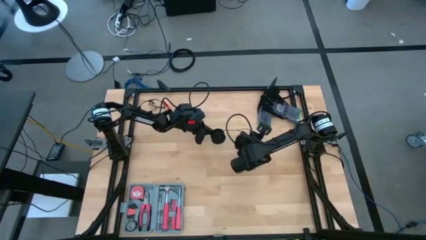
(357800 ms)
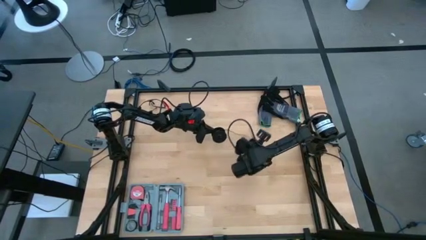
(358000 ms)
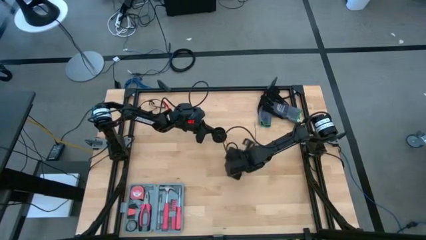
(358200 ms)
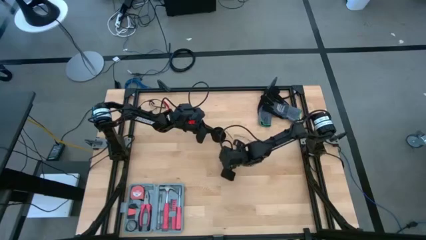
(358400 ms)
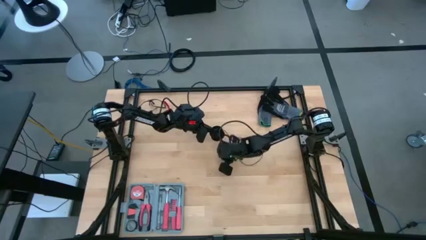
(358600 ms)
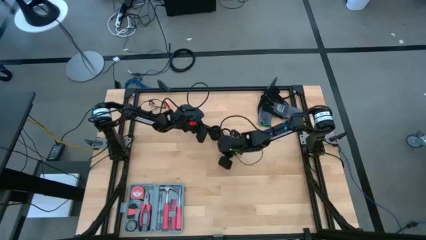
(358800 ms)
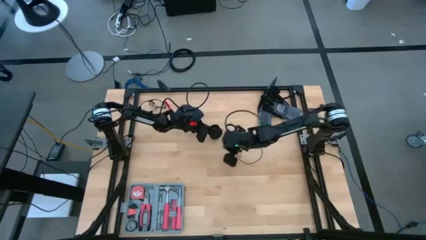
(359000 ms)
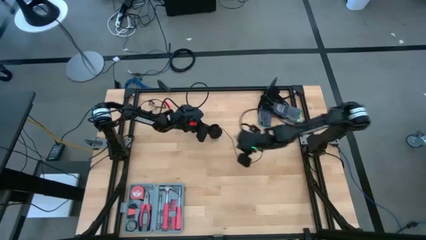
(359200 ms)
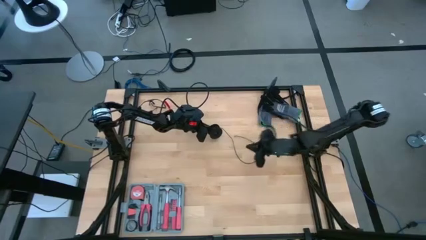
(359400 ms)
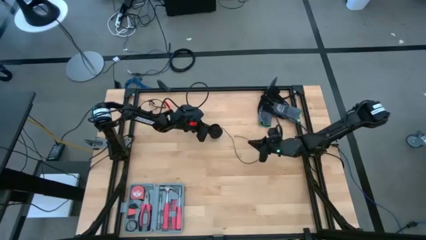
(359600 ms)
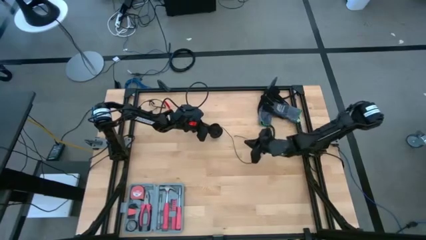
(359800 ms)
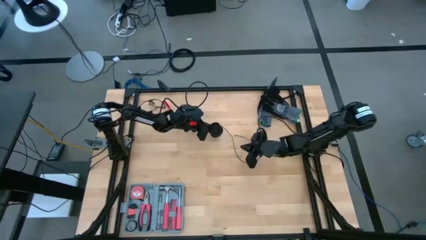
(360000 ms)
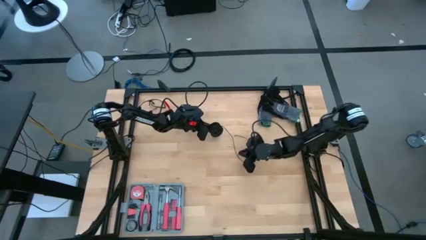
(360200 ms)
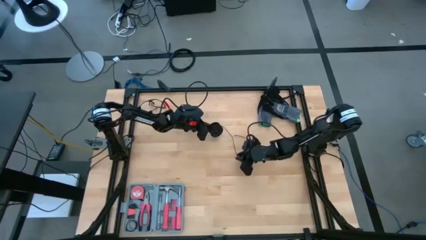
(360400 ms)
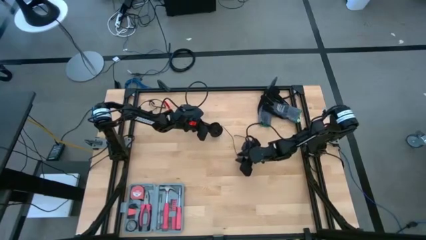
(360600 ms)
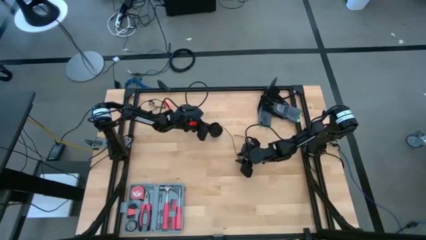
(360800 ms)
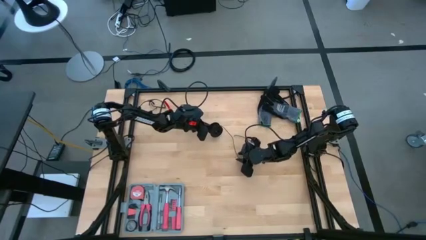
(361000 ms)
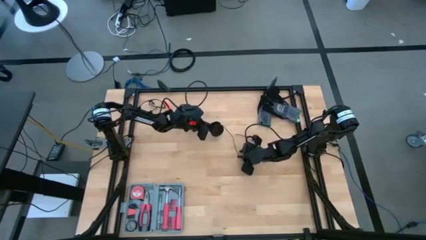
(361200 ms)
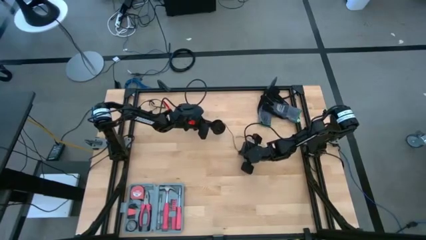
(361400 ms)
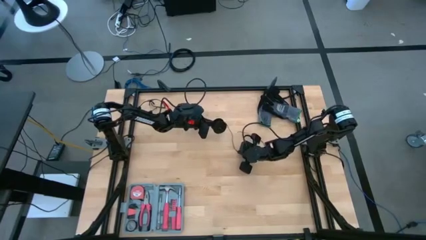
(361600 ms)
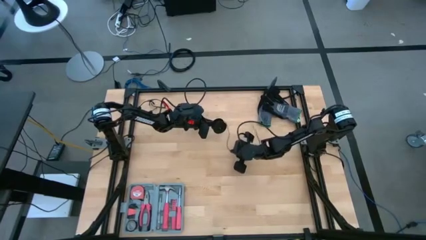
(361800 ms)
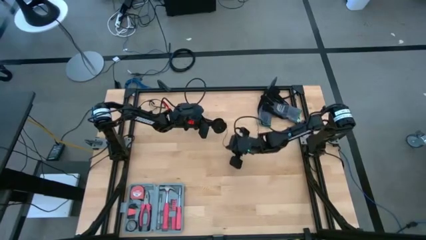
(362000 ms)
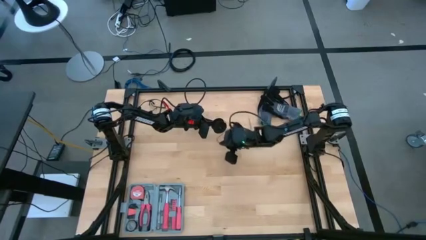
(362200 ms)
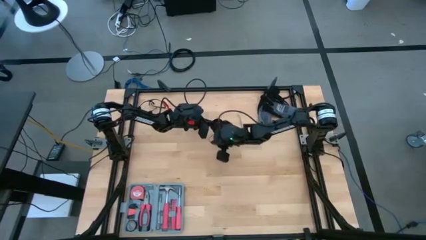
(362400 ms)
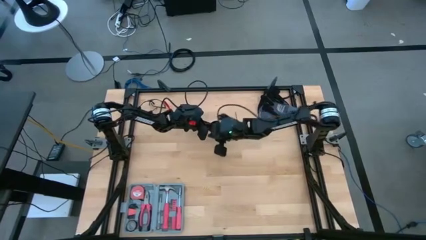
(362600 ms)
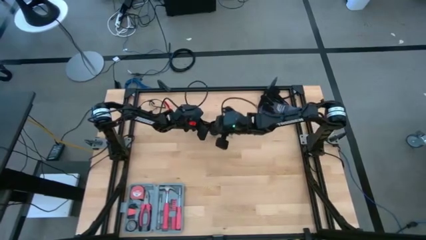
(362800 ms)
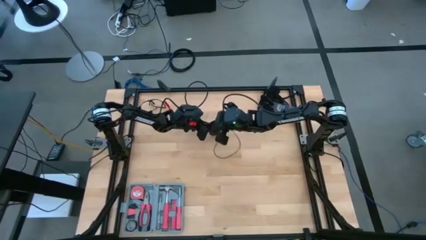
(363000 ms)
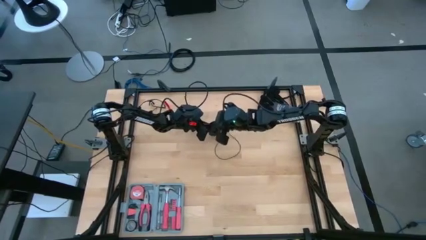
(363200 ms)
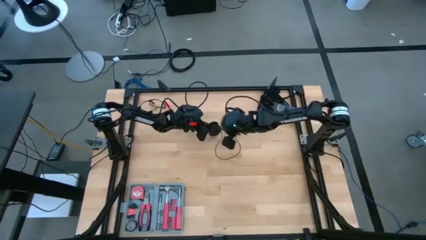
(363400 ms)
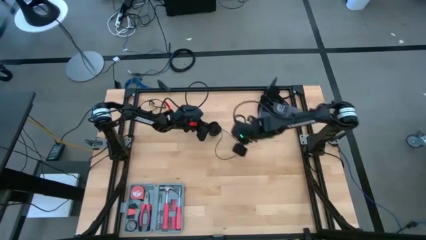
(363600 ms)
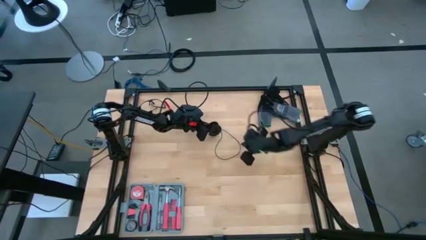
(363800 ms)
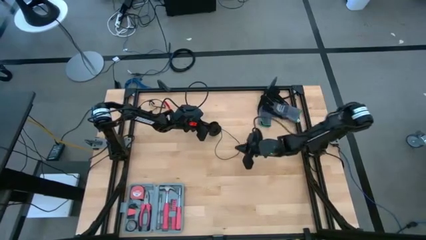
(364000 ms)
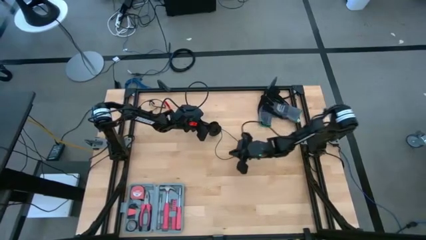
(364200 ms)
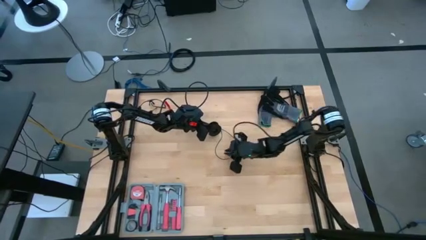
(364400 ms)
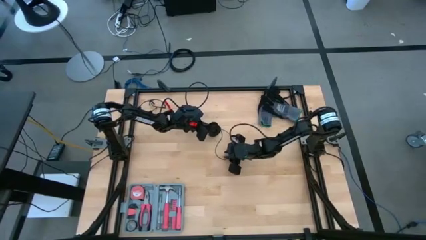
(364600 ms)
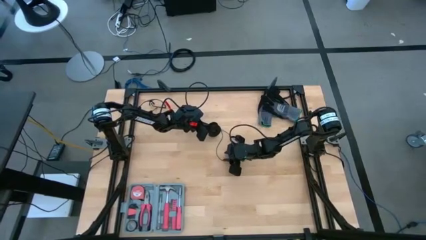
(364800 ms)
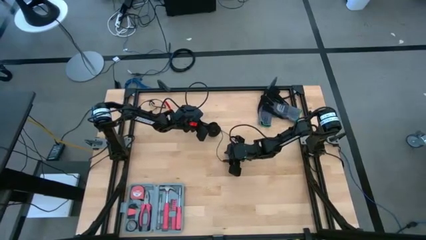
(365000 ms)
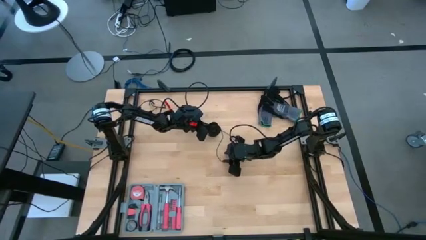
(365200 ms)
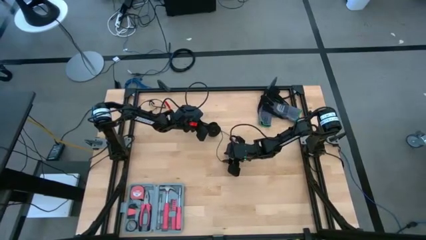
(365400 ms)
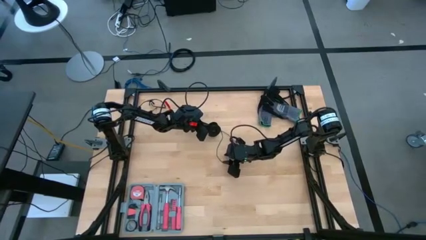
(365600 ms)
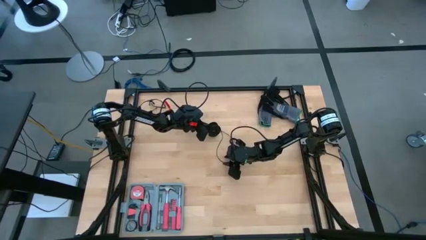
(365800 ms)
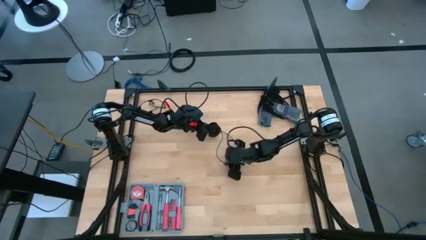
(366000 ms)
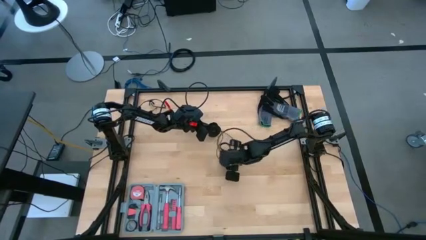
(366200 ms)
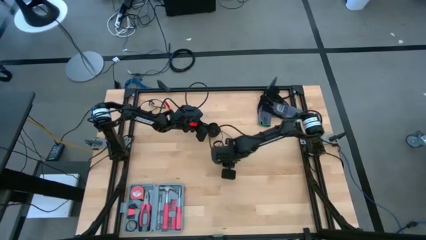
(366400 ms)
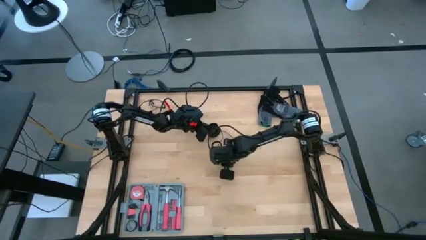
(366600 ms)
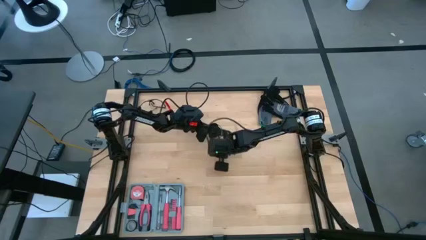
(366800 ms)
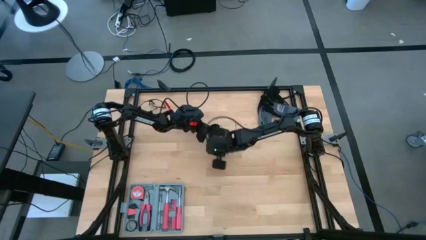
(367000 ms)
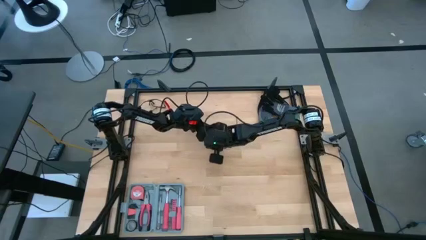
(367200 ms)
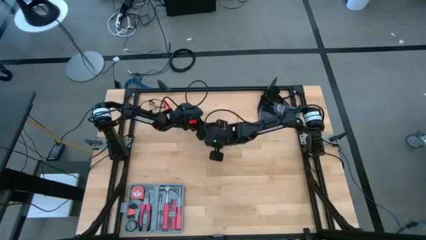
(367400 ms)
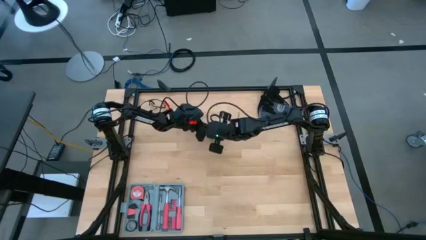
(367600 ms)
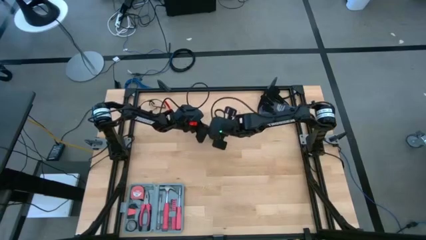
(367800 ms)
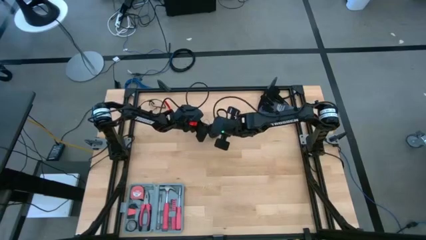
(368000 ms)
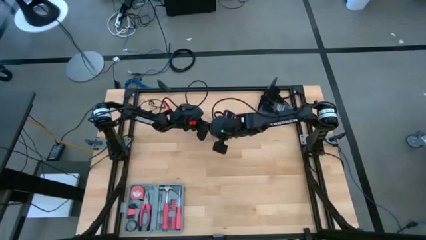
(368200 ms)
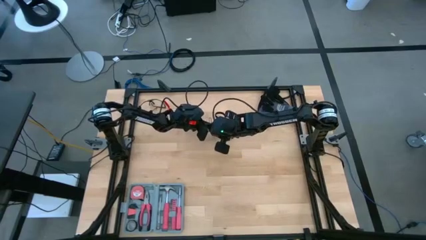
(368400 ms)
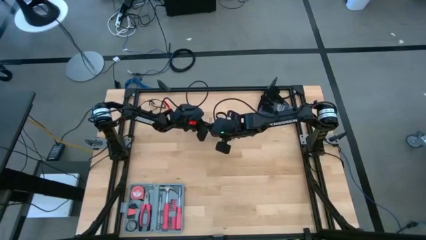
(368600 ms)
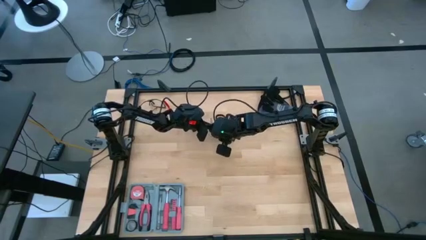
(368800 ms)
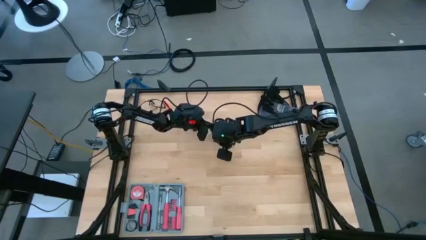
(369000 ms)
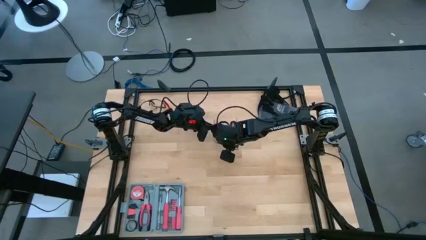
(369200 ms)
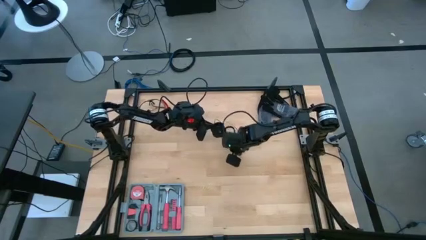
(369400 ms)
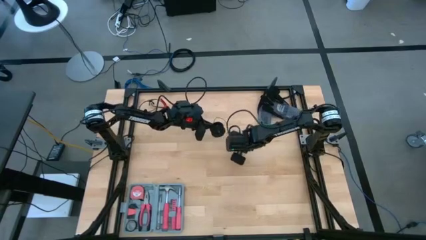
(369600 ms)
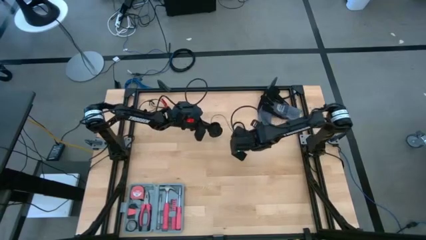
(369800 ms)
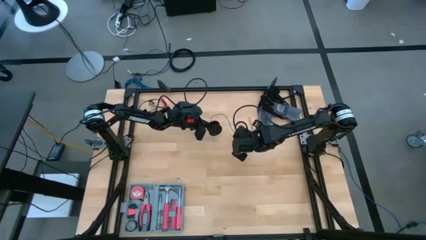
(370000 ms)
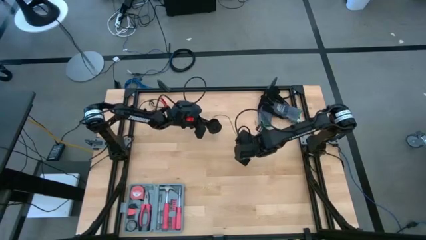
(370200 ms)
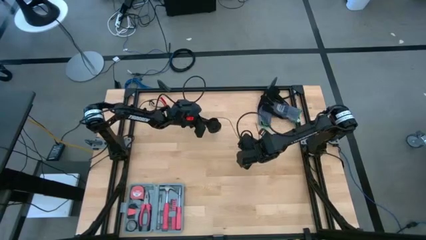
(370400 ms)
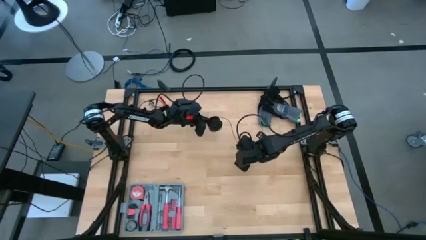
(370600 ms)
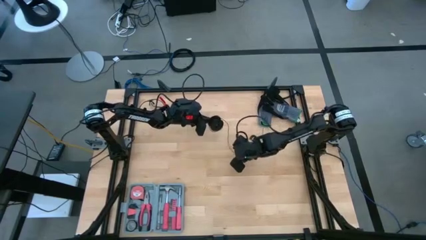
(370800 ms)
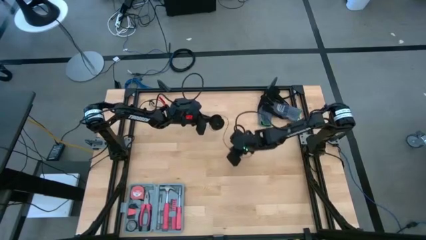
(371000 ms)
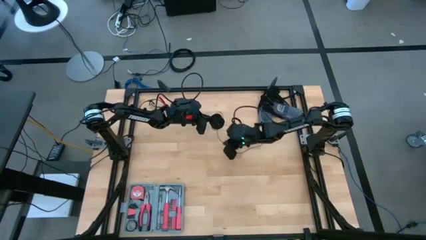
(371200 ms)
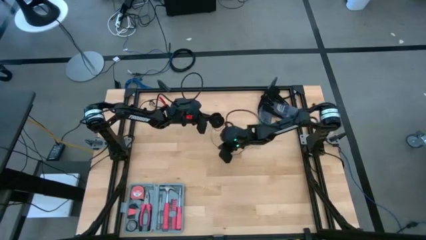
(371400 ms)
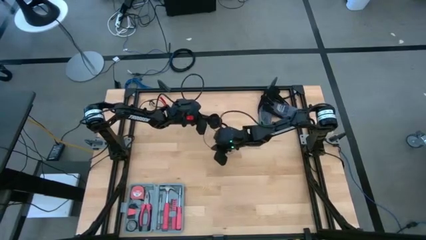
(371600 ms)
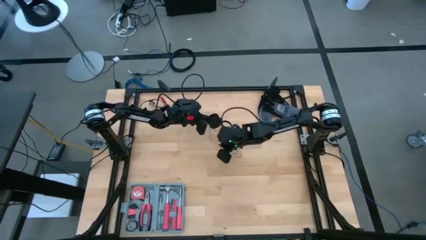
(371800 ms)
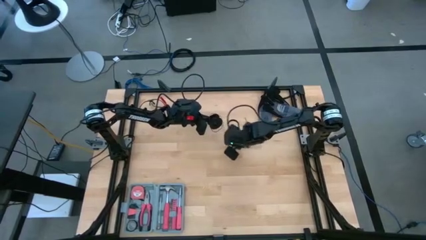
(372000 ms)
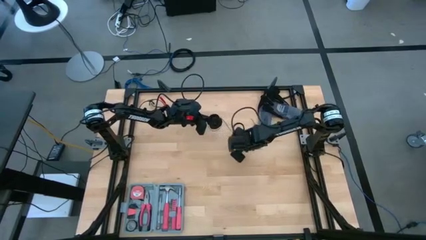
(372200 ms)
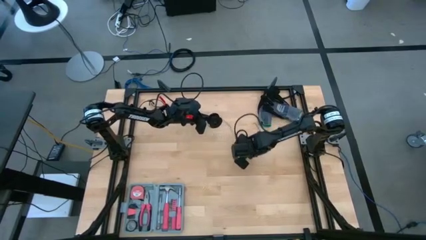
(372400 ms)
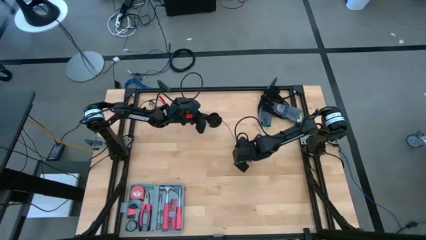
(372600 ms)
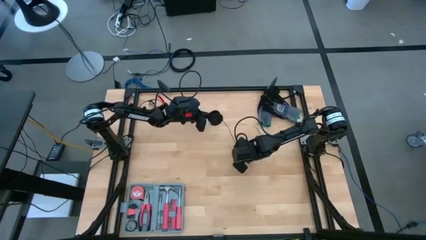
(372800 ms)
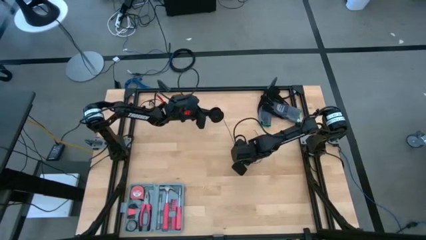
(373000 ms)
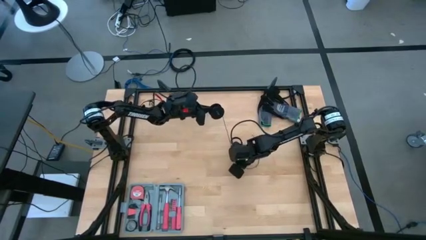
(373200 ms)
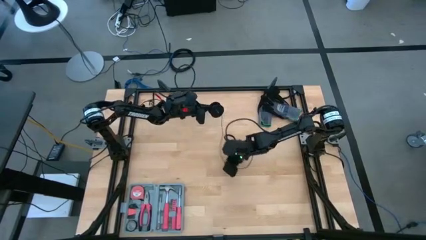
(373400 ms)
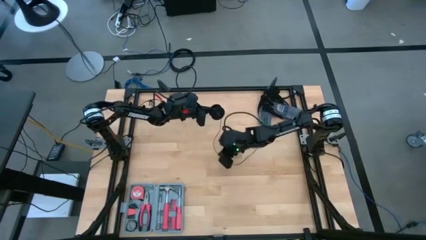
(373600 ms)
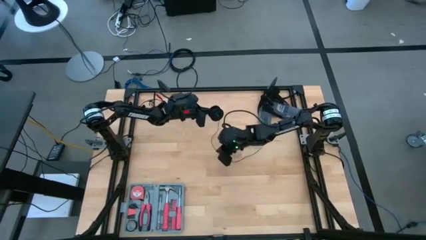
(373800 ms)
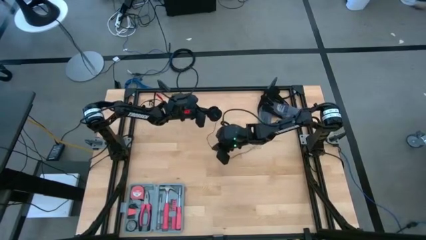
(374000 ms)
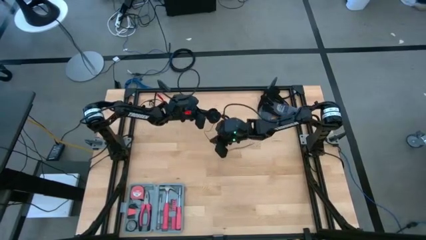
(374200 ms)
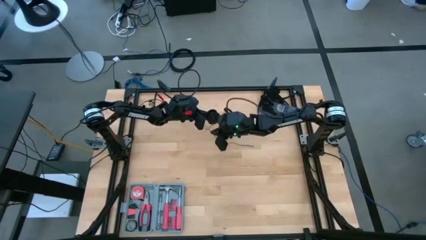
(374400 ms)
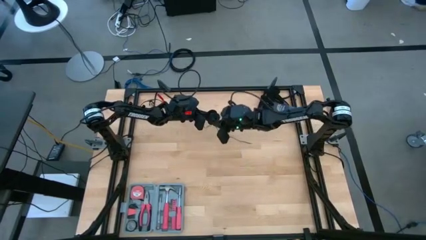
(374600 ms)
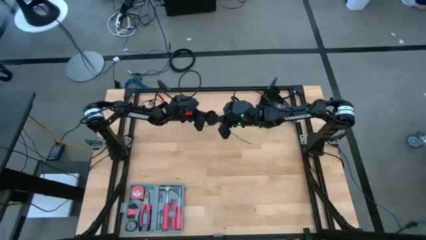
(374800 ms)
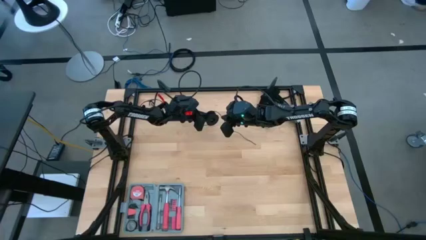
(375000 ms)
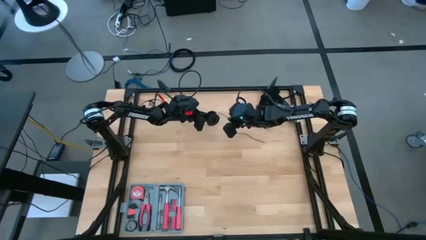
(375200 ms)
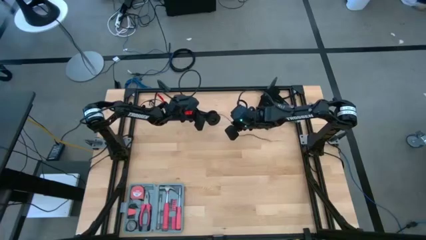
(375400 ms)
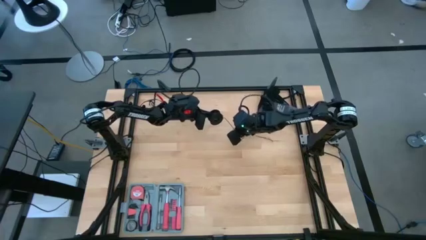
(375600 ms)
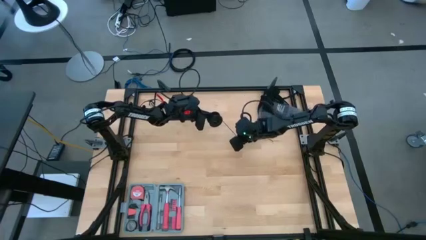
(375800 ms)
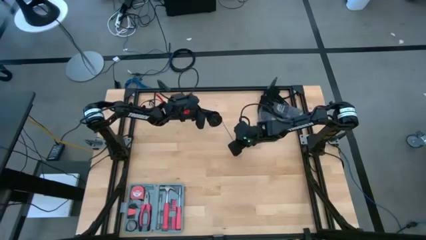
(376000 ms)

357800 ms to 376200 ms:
Task: Coil cords
Coil the black wire onto the black spool
